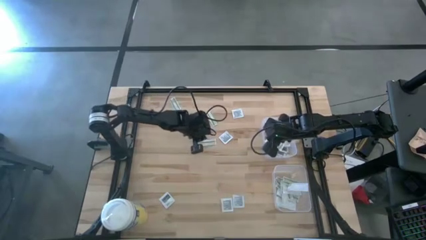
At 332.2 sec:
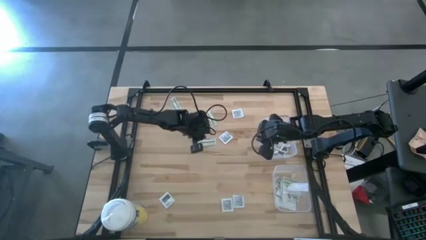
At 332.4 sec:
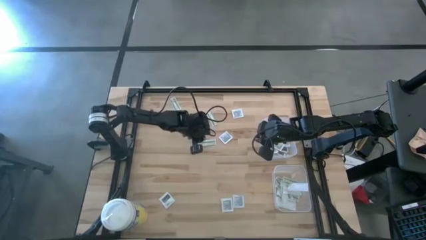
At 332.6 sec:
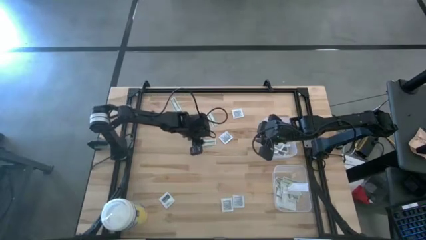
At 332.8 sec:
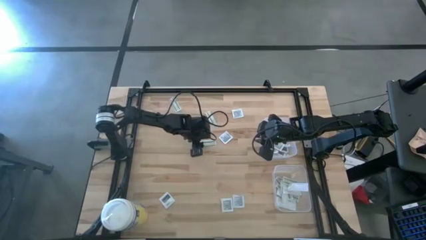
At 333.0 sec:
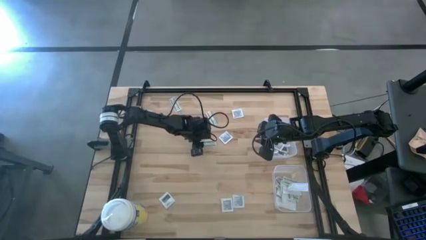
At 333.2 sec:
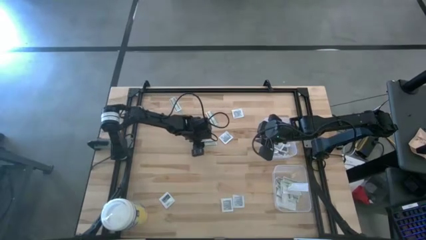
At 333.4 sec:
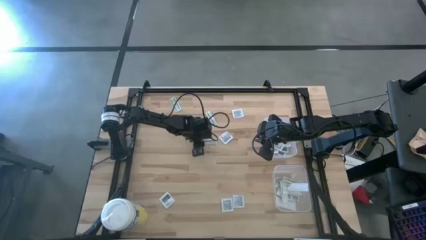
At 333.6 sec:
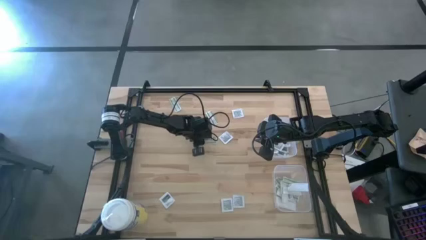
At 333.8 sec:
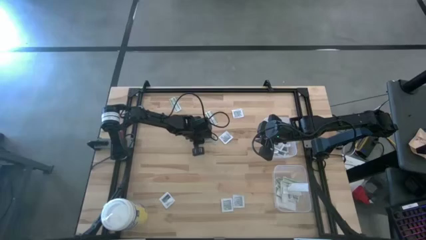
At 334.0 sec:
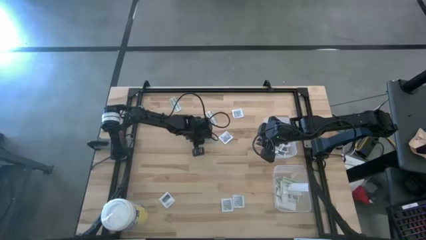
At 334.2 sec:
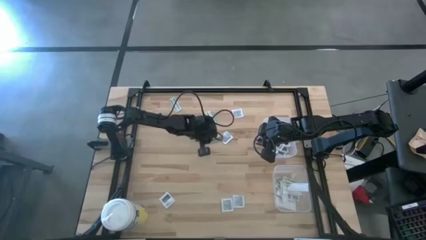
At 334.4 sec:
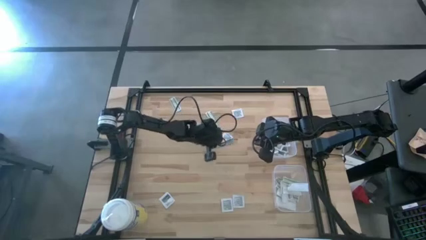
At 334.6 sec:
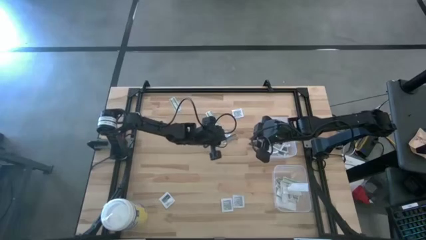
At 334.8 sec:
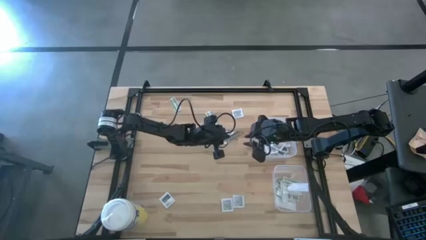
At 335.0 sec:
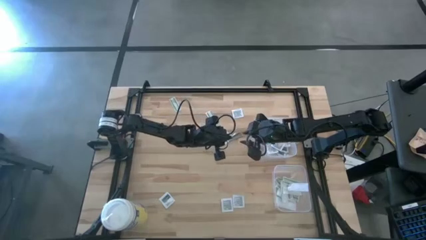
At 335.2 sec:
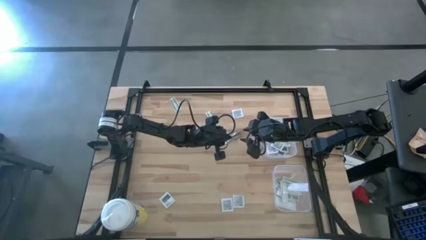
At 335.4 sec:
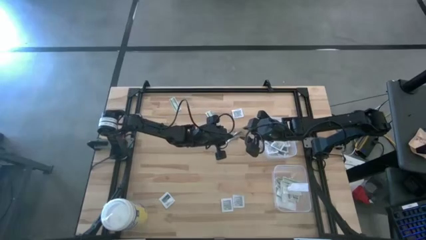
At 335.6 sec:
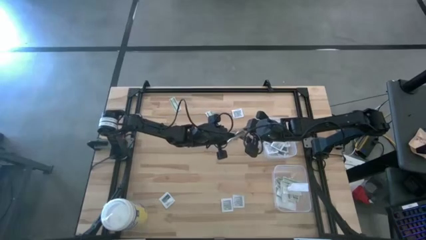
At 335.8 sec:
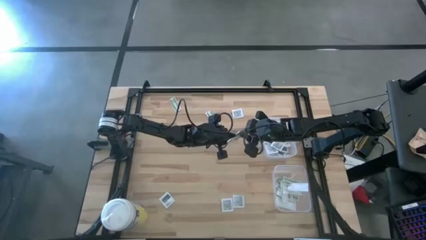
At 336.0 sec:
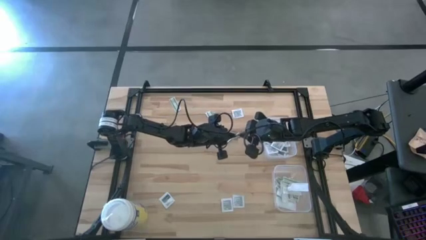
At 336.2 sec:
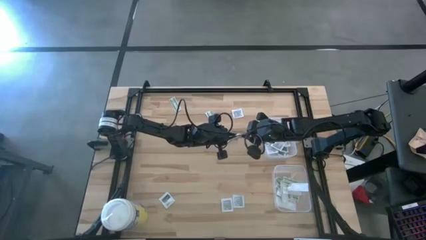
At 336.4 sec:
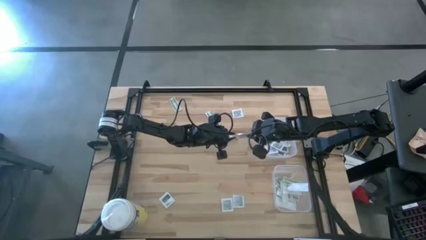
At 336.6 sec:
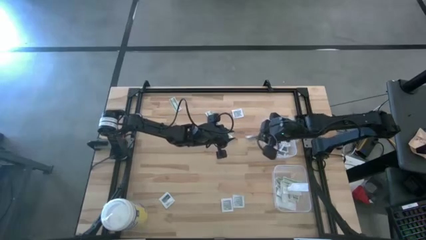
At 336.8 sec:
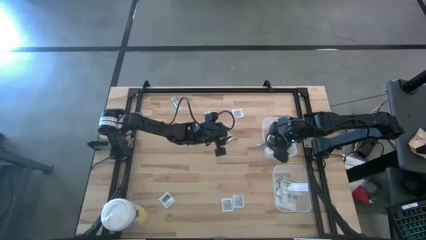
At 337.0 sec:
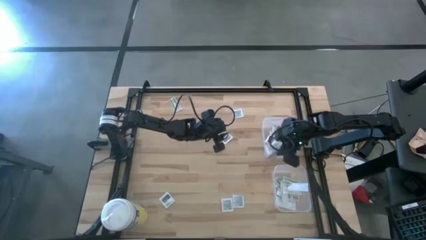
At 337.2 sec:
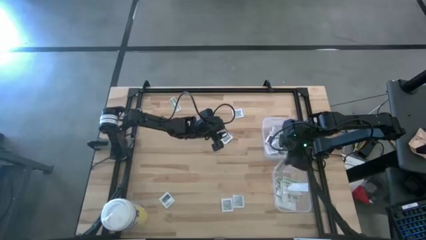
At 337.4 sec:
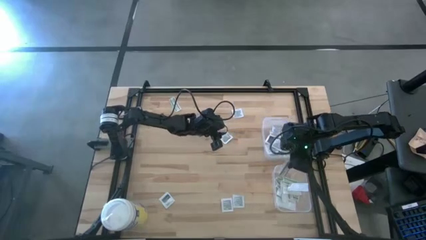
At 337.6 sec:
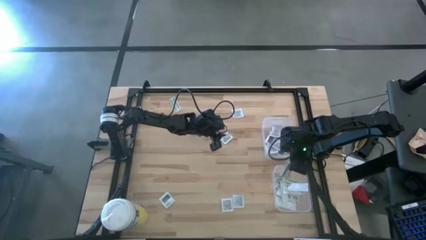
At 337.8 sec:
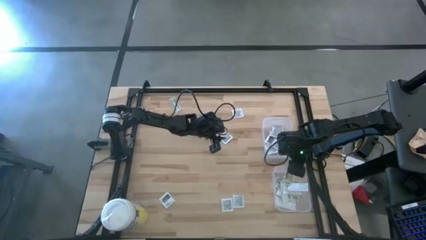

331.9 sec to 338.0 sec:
Task: Pick & Place First Aid Supplies
Put the middle bandage pack into the bottom bin

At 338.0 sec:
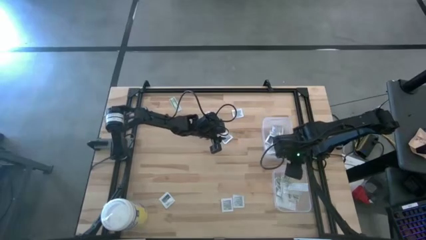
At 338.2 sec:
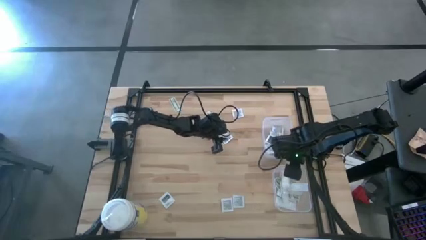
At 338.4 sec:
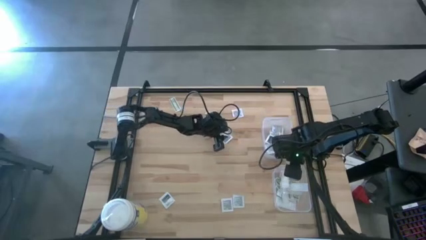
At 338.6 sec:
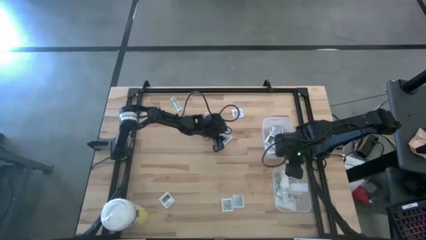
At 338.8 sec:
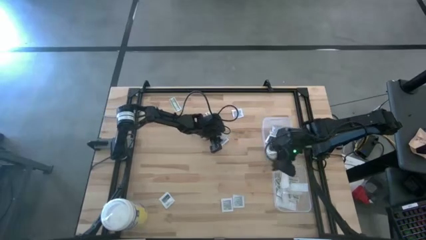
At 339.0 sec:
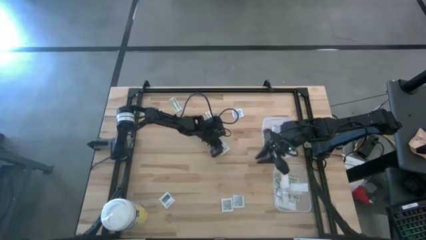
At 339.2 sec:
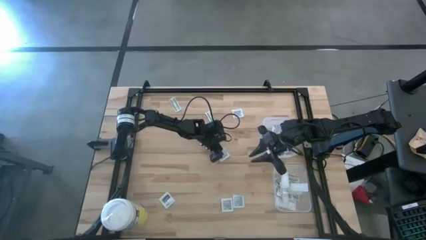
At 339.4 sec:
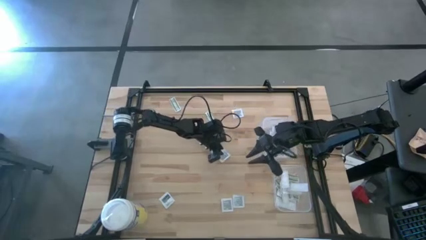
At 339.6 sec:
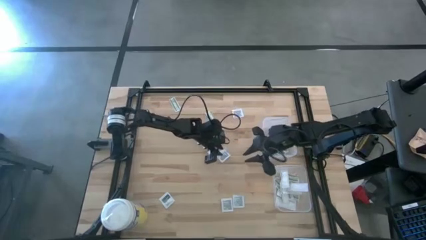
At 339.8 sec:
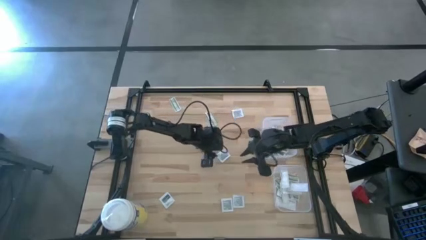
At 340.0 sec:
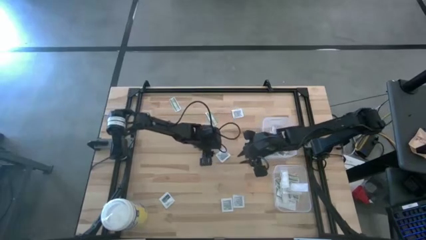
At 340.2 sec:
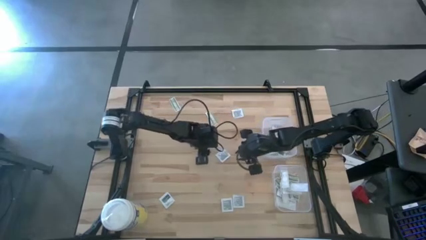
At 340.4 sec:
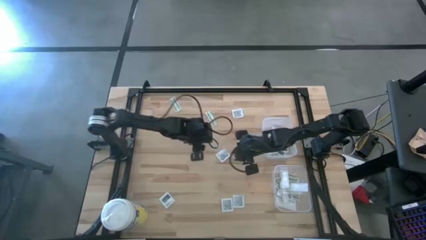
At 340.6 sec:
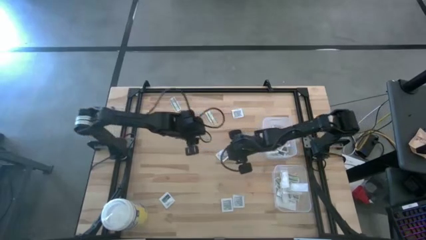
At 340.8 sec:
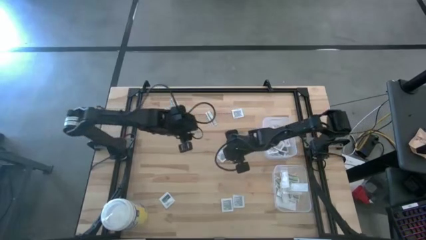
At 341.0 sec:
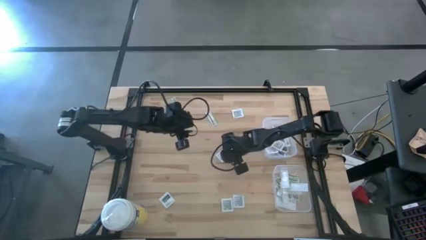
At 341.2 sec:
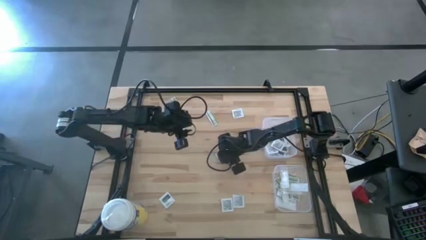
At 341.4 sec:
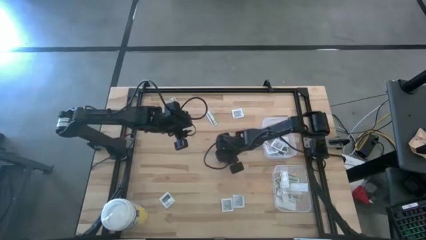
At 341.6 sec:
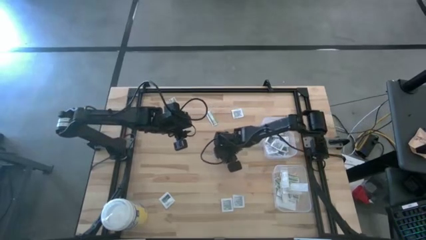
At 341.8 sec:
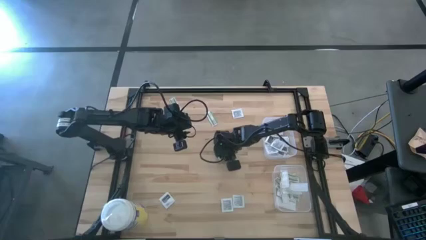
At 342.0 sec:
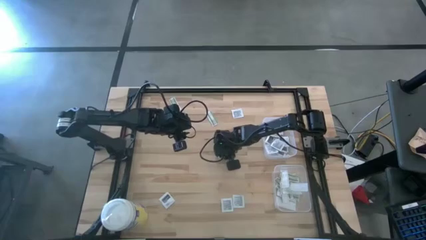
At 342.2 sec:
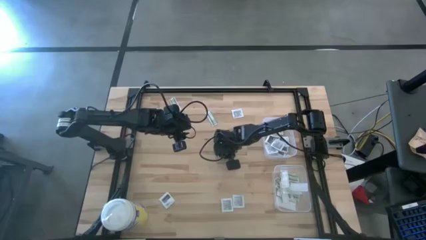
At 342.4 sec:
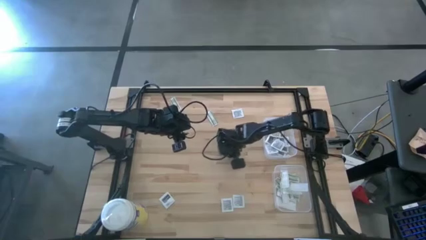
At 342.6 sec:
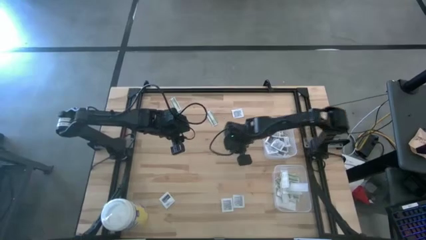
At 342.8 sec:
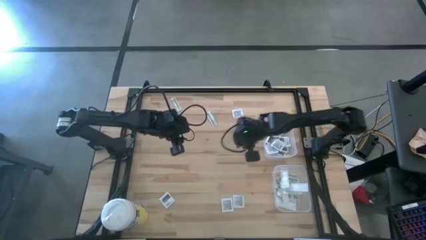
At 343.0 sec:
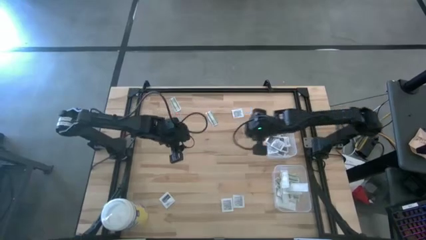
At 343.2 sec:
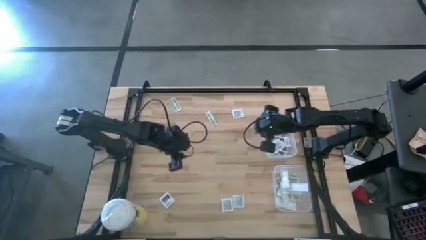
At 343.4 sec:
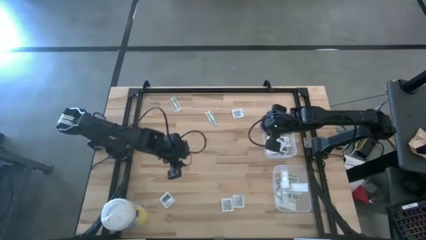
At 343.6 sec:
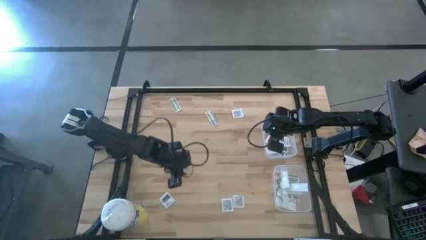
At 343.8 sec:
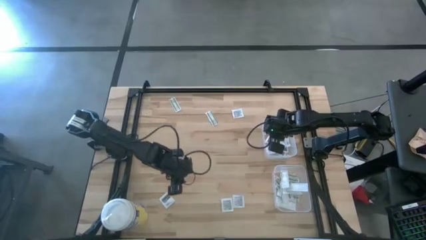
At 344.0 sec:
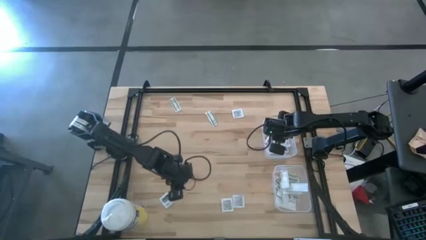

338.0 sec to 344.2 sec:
Put the towelette pack into the top bin

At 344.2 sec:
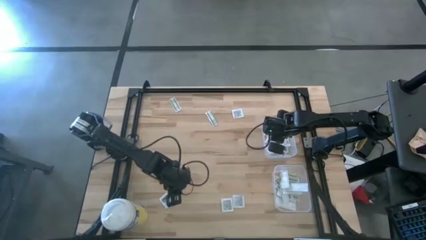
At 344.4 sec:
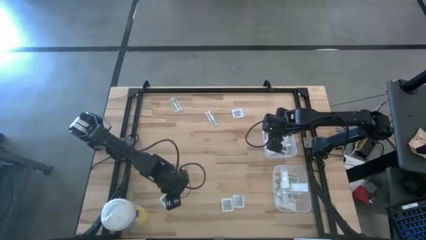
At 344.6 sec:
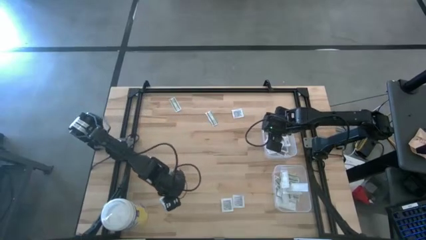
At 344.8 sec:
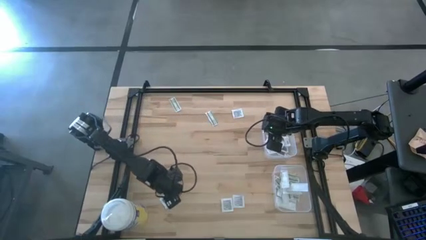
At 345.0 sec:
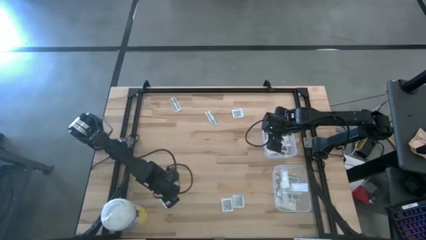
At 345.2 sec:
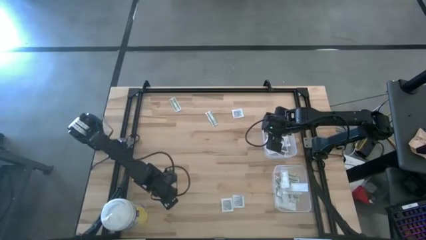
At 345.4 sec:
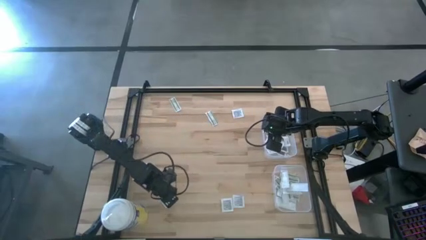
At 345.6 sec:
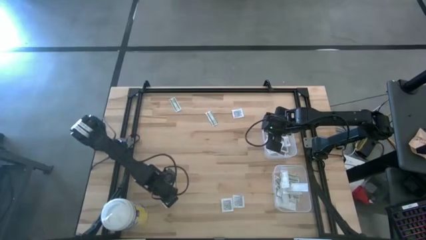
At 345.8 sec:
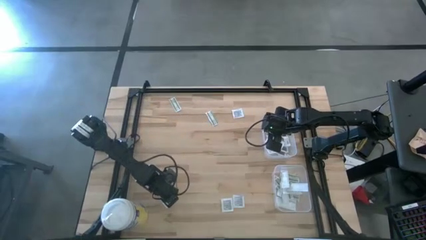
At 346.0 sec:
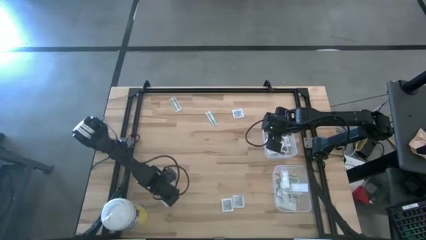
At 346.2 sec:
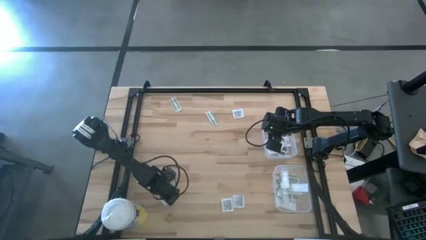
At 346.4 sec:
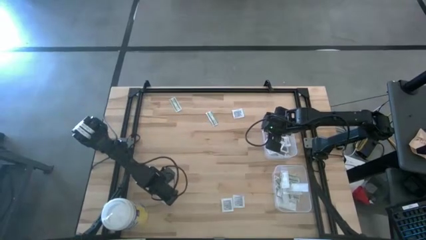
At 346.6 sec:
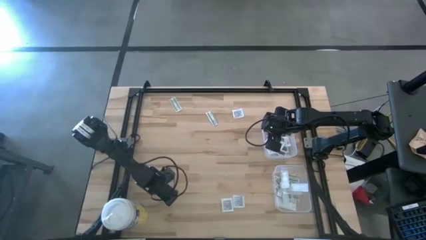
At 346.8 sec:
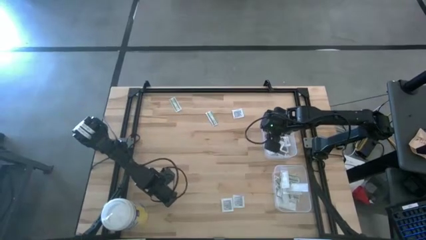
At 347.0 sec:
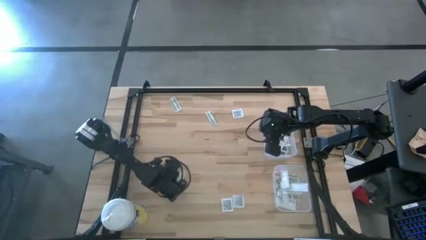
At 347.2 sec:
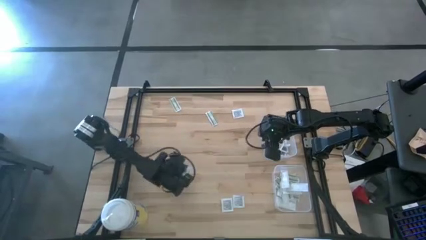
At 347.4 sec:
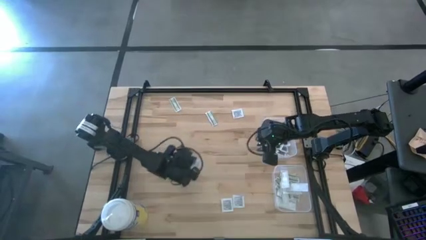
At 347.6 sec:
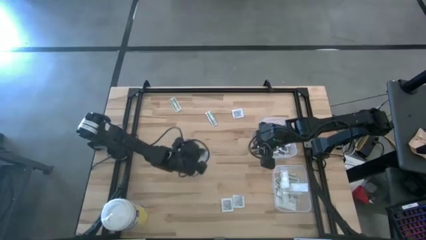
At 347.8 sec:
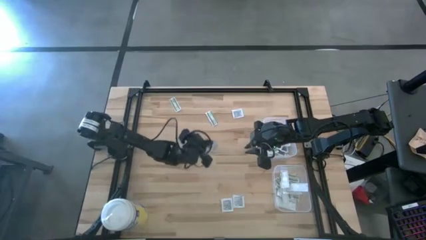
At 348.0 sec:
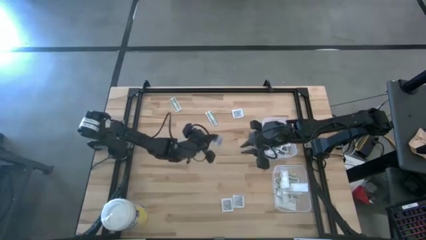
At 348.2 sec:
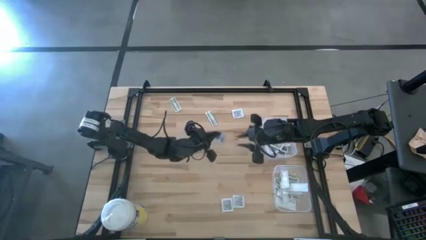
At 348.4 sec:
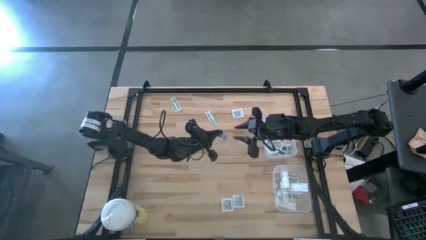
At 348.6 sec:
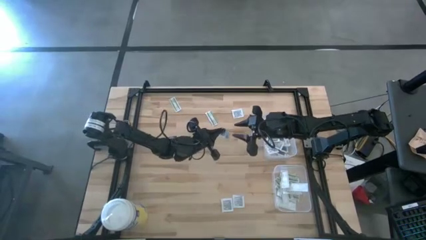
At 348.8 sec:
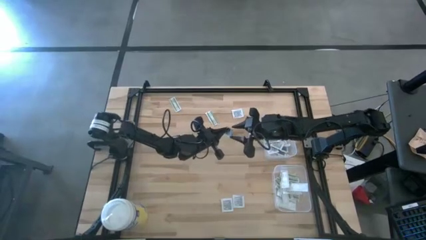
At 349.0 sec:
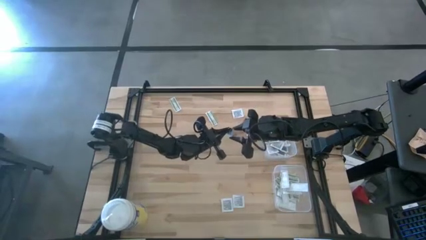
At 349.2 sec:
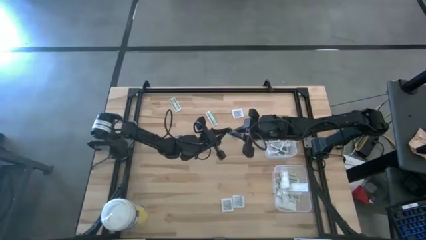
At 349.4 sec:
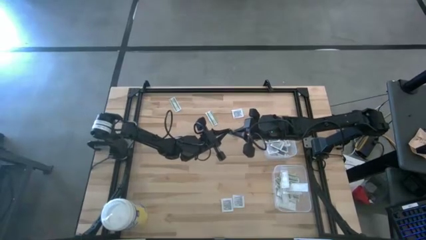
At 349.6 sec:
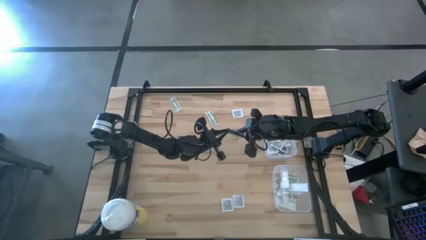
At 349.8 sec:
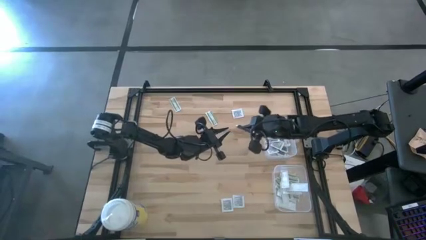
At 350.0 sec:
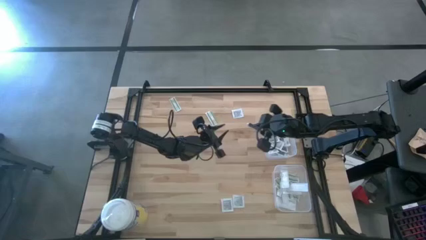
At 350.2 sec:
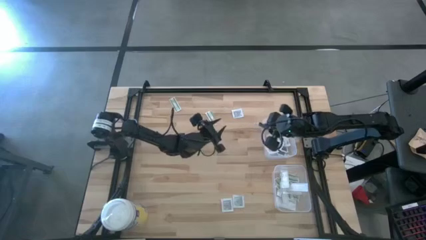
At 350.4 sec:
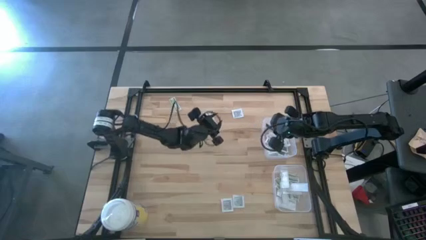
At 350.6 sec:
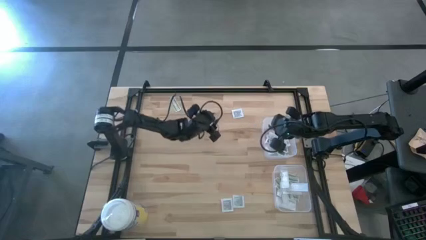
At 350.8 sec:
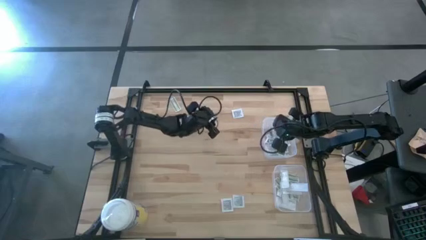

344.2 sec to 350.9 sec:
Put the towelette pack into the top bin
